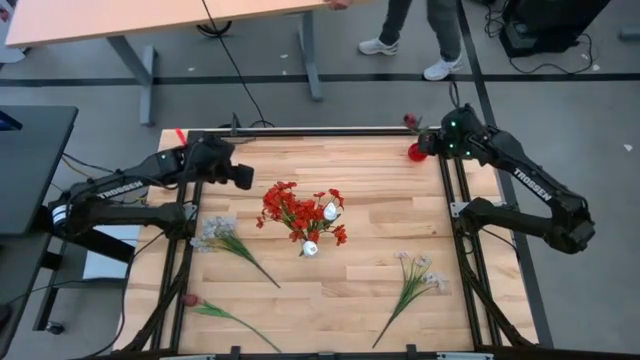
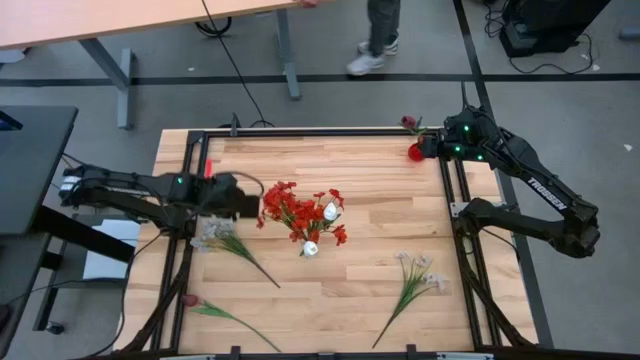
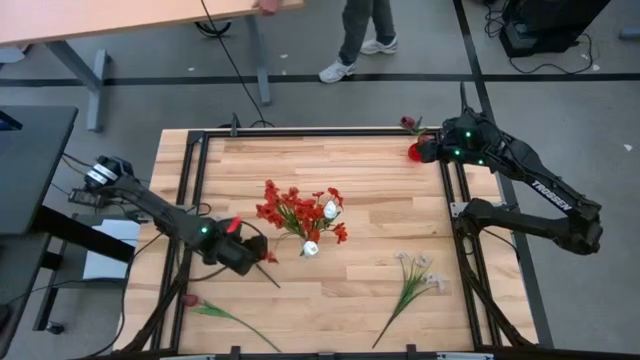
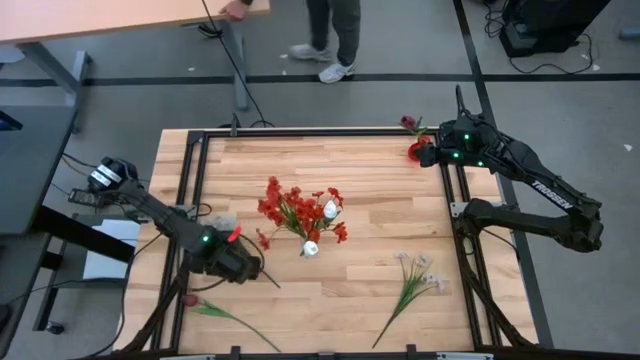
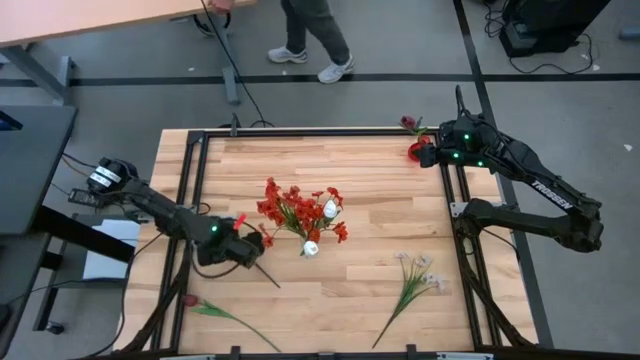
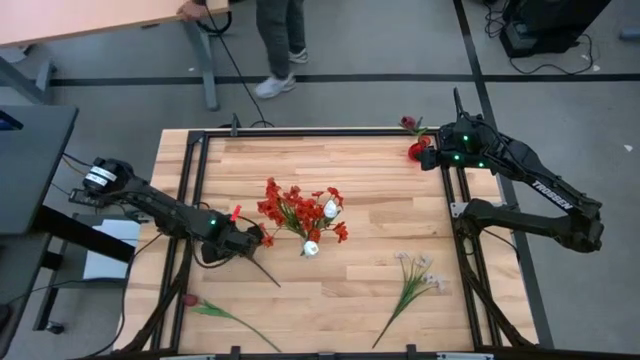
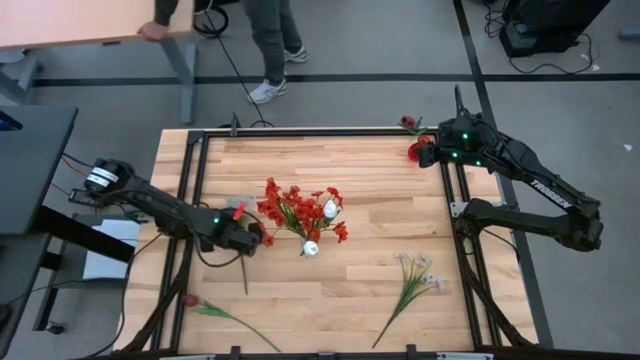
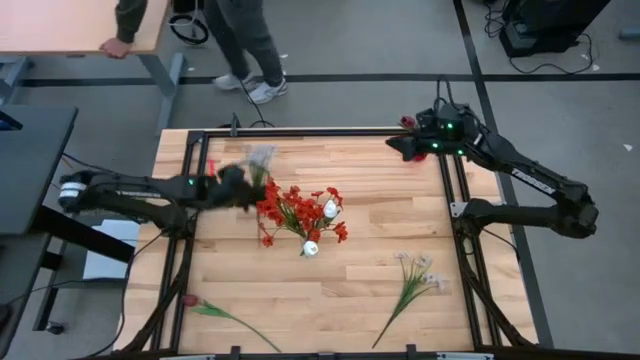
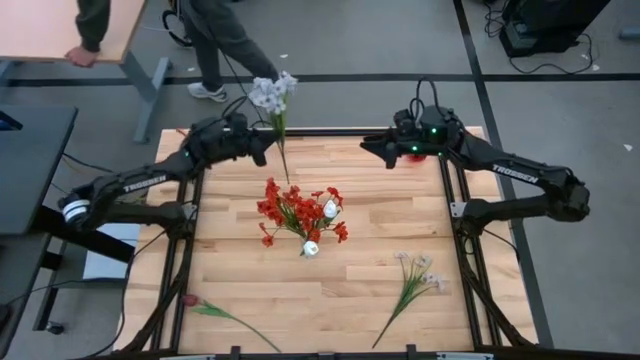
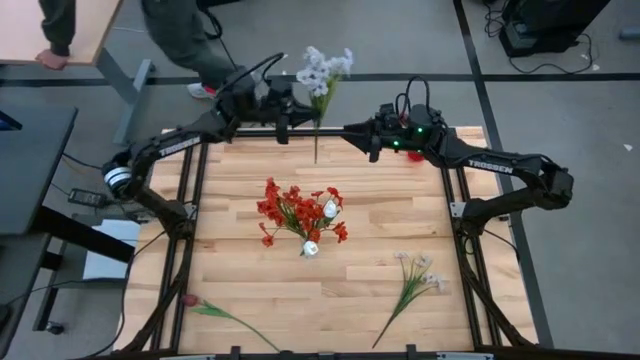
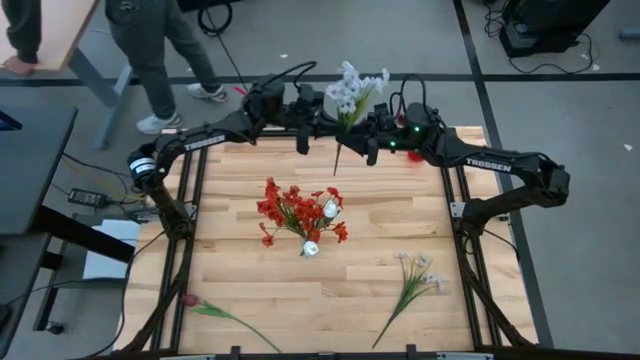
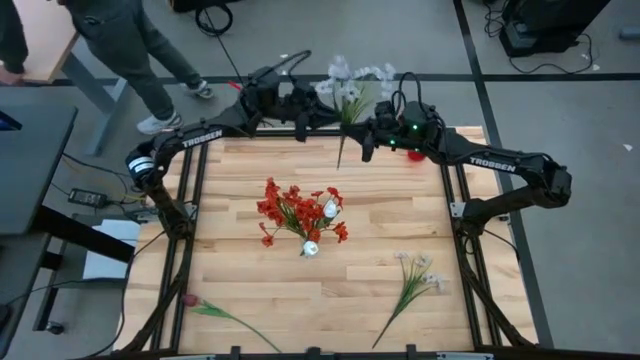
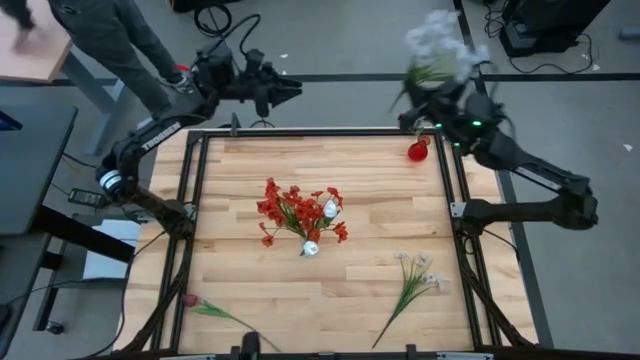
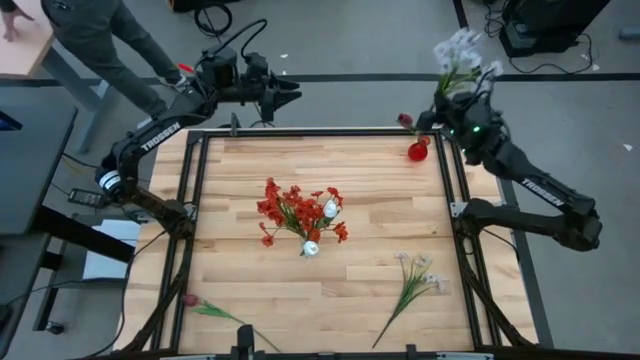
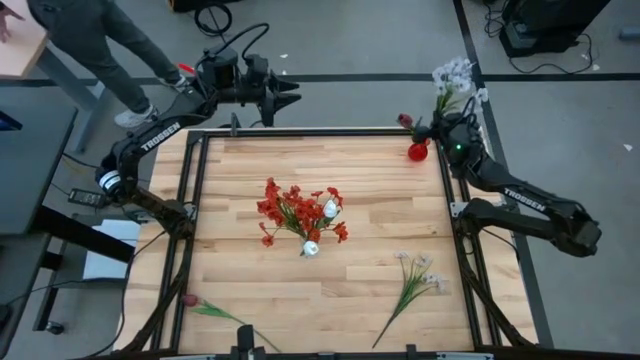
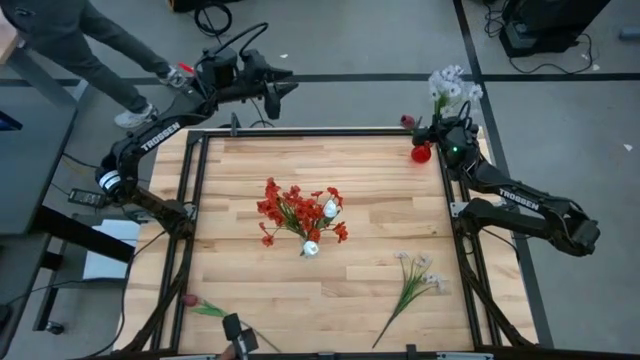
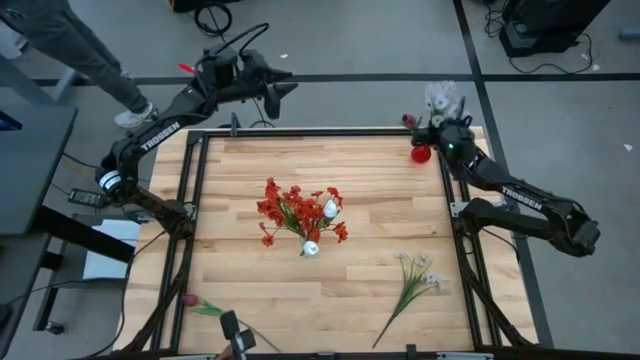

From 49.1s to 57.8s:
Task: Sort flowers into vase by color
Put the top white flowers into the red vase

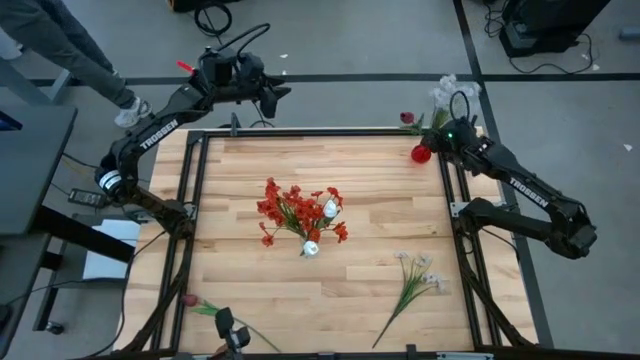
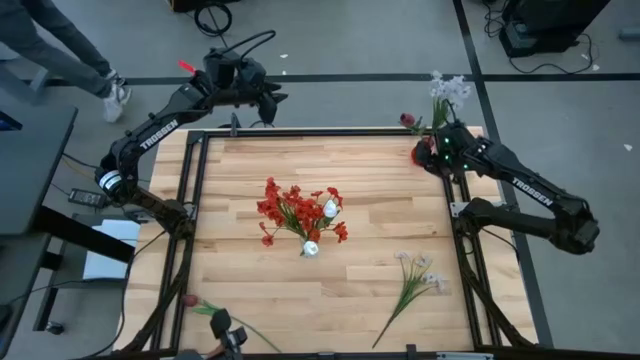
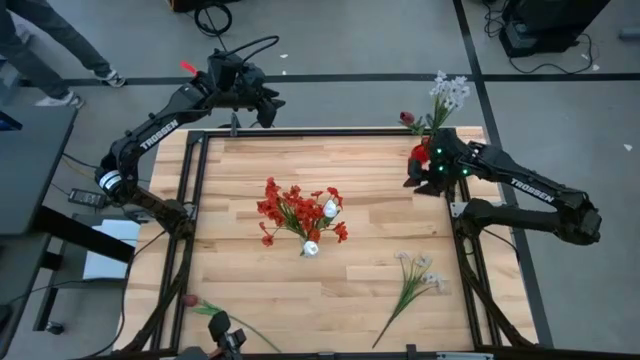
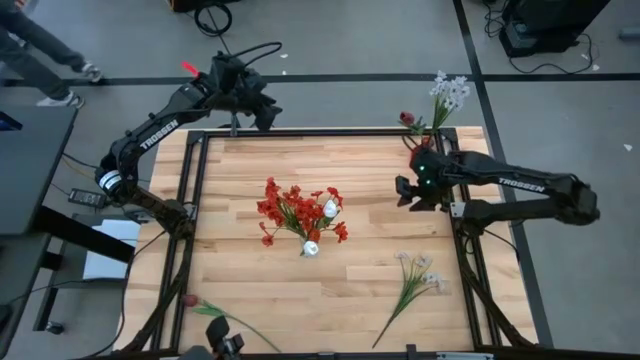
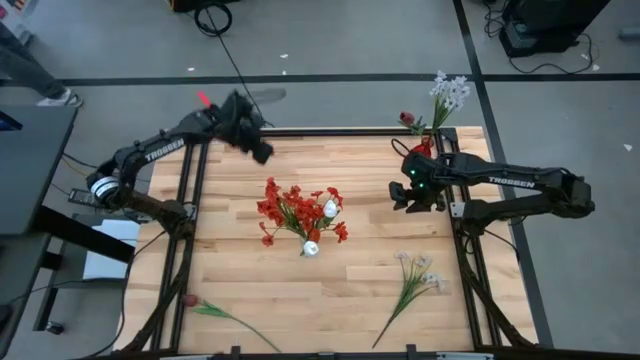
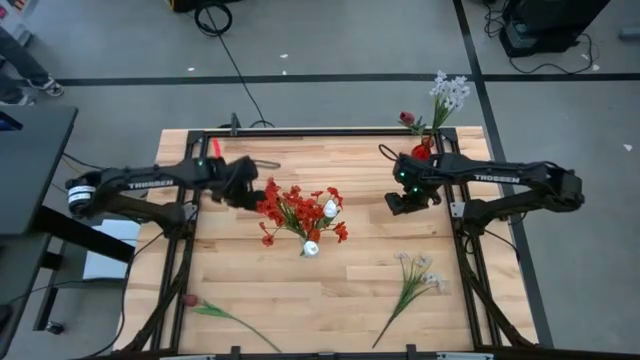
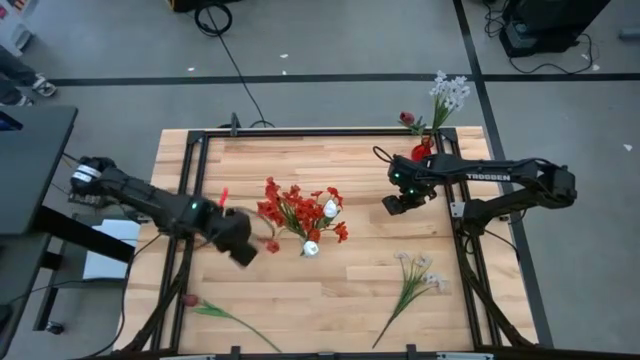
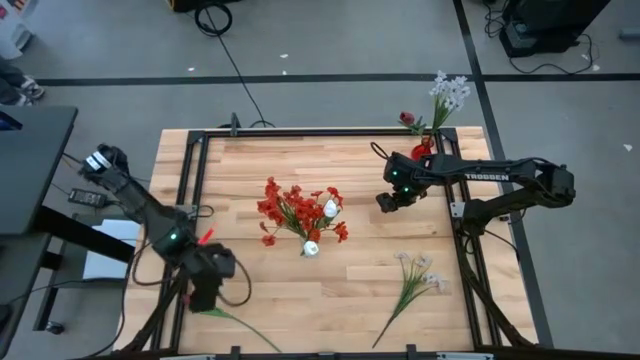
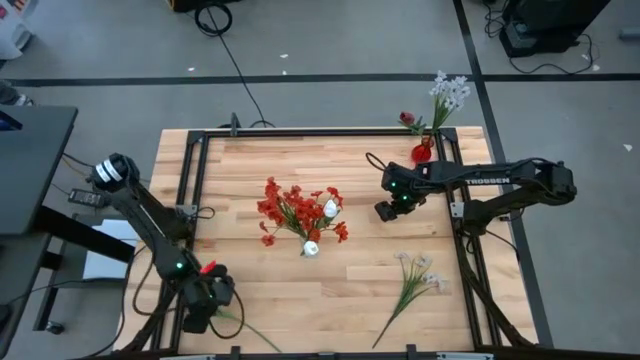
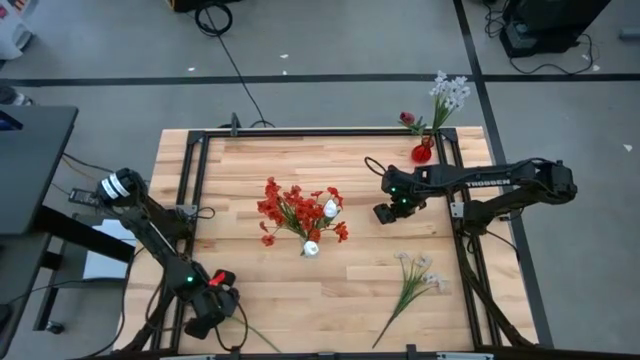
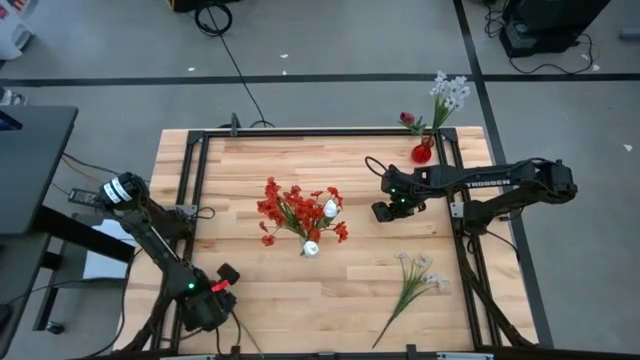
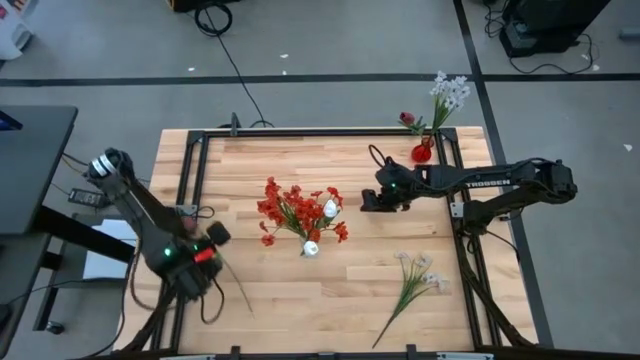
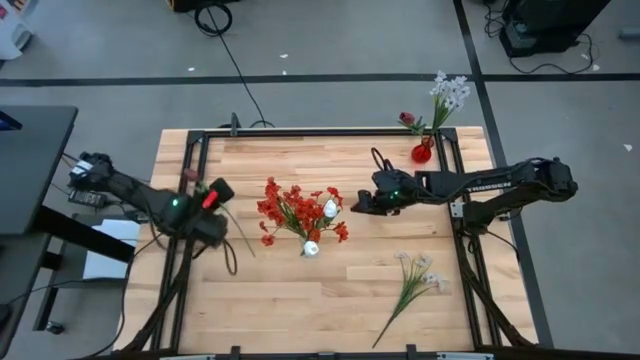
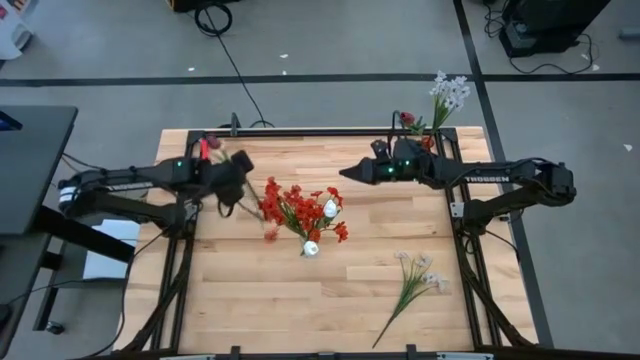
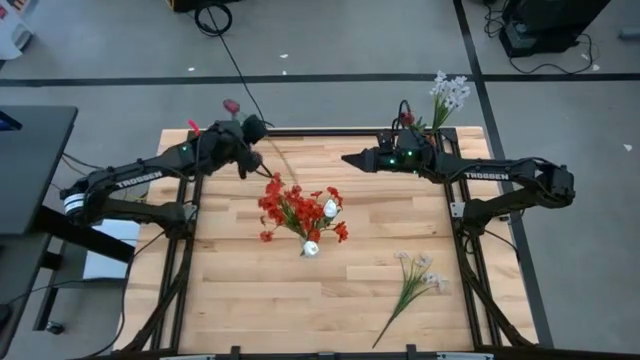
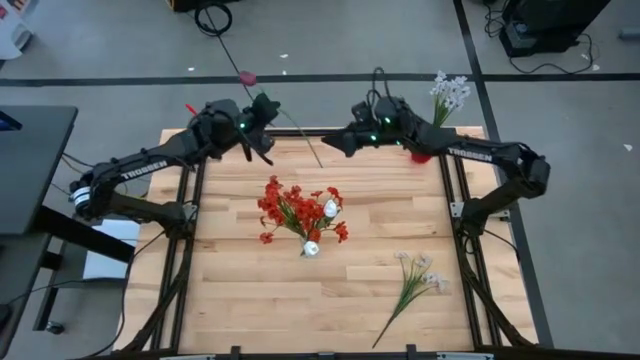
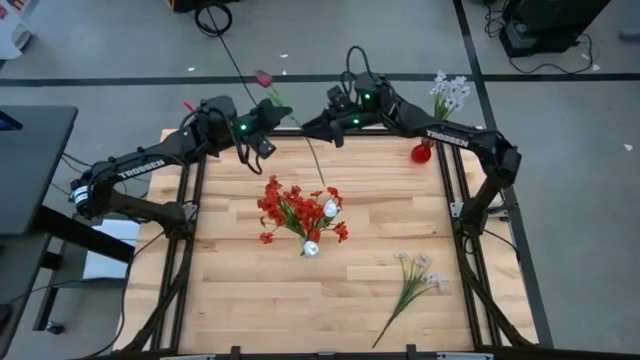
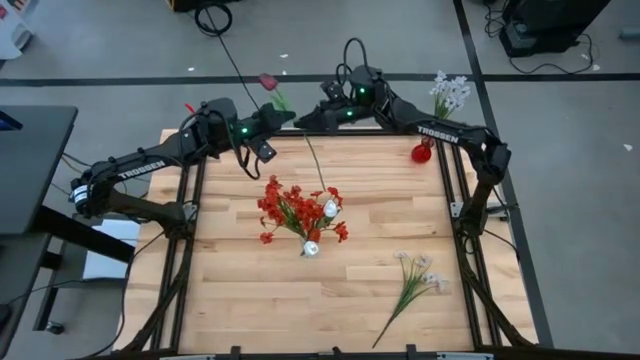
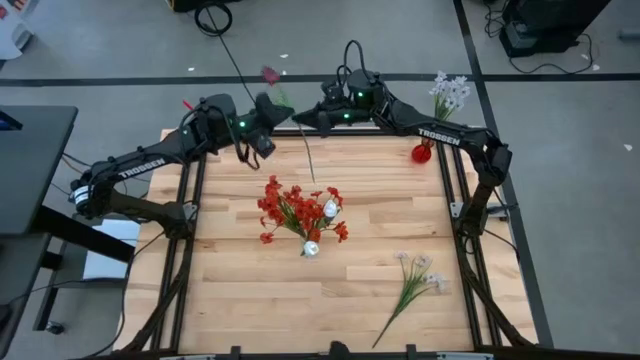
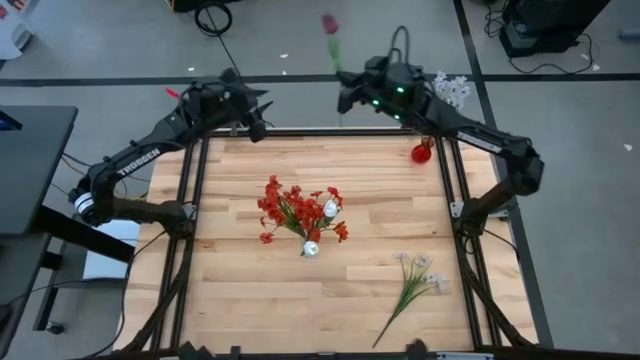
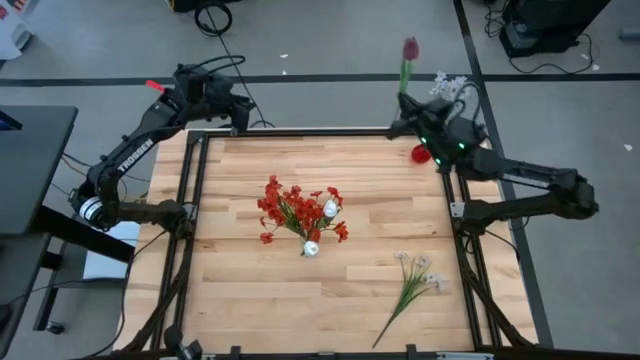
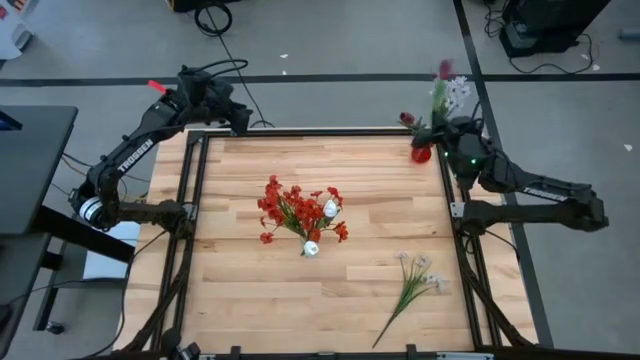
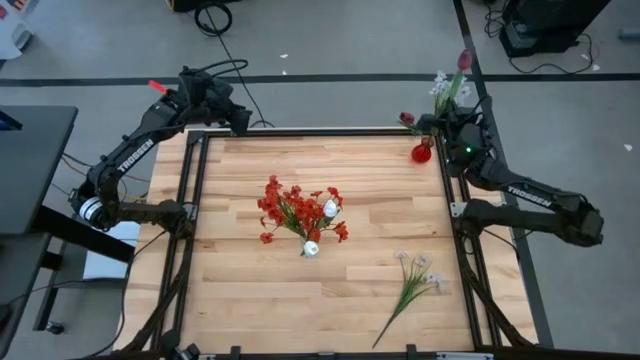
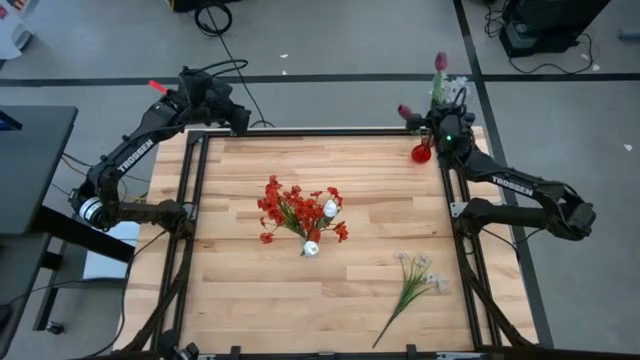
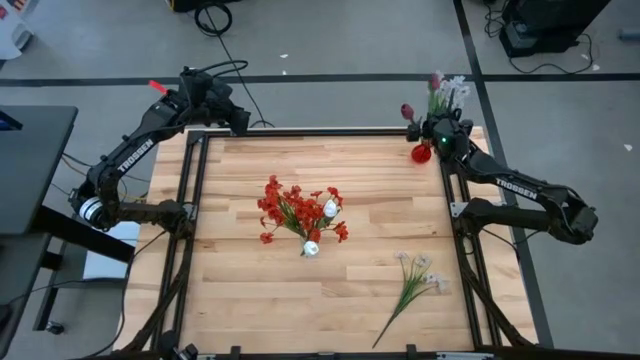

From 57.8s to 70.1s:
Put the dark red flower into the red vase

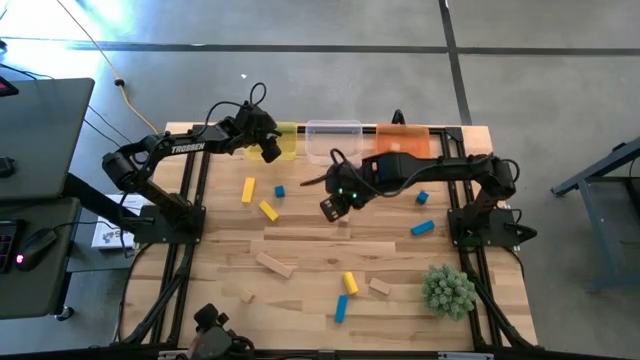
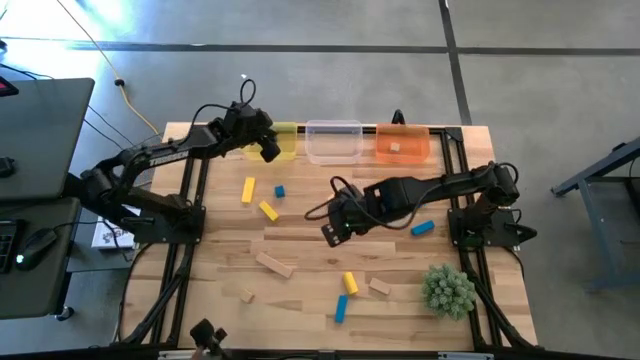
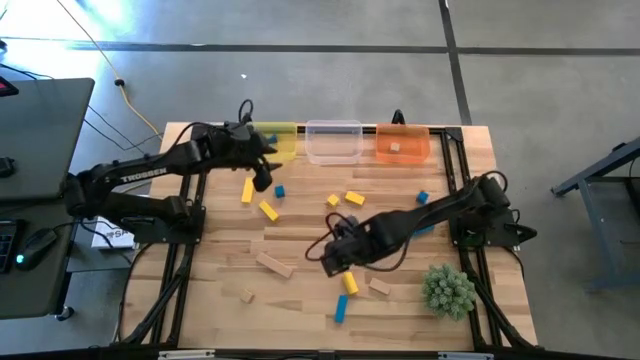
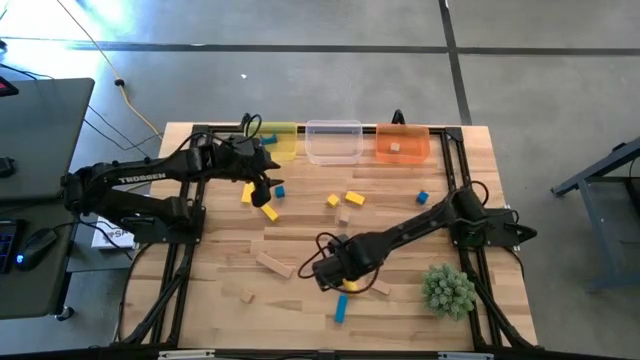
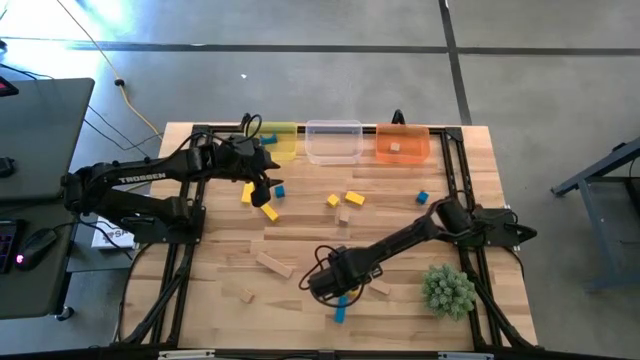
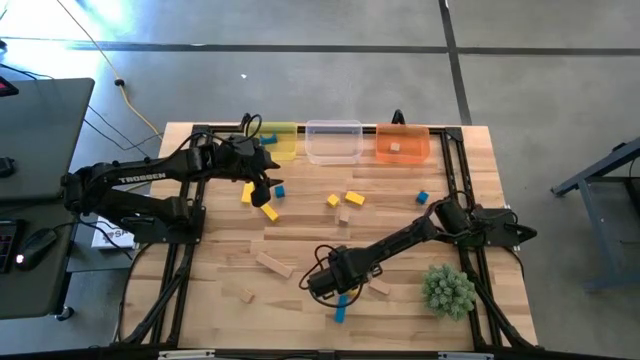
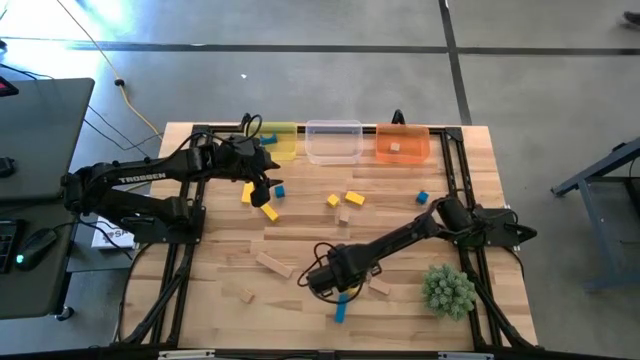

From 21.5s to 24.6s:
Task: Sort & place blocks by color
Put the yellow block into the transparent bin
